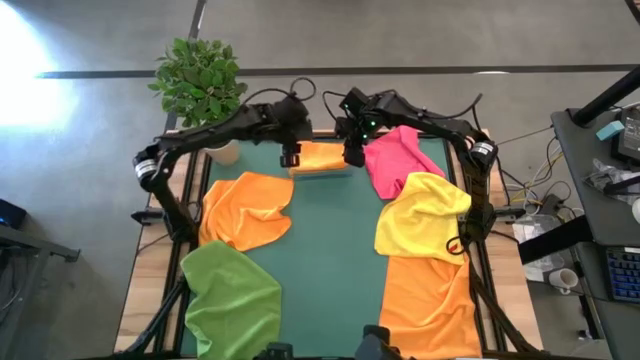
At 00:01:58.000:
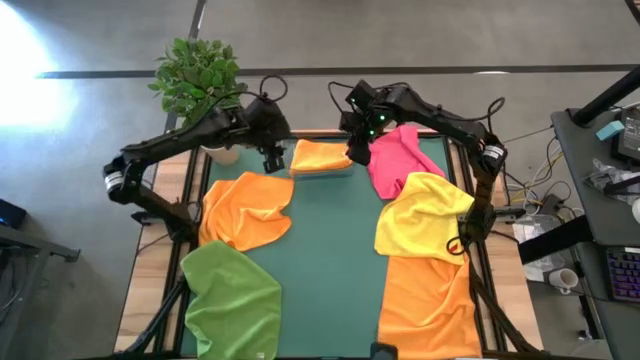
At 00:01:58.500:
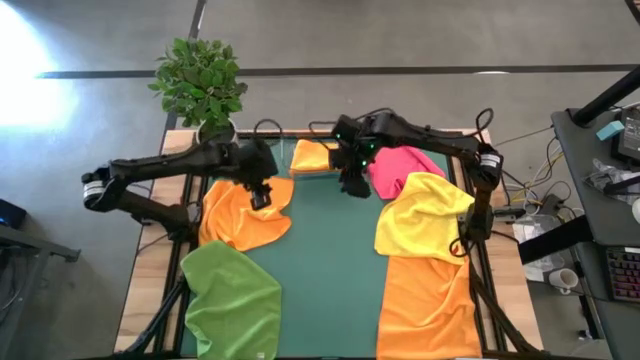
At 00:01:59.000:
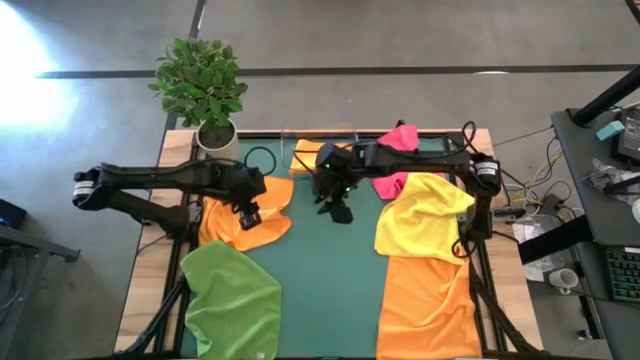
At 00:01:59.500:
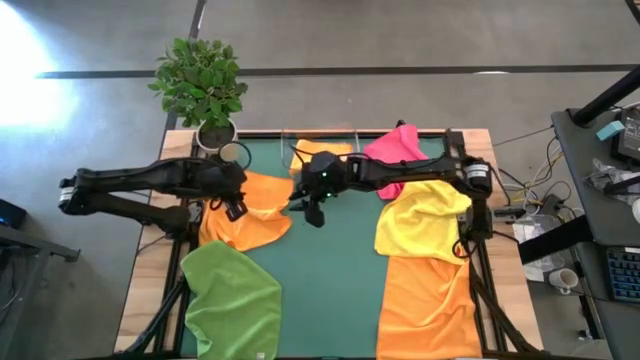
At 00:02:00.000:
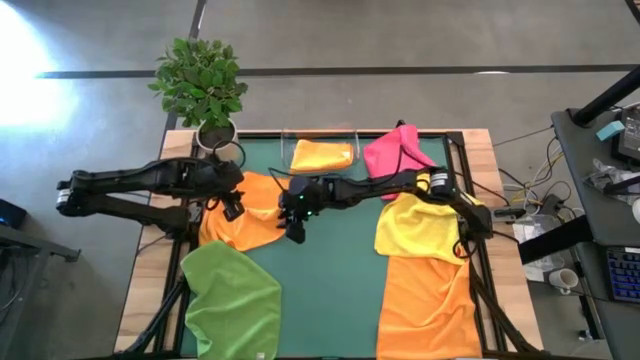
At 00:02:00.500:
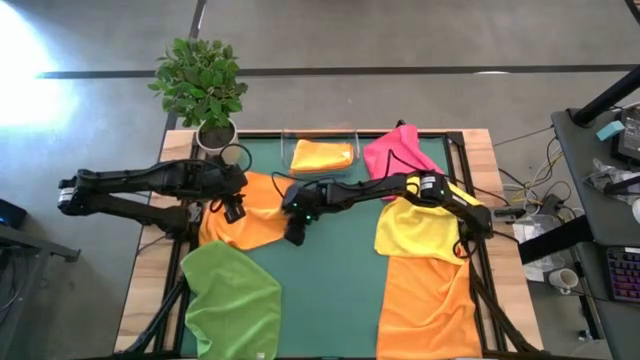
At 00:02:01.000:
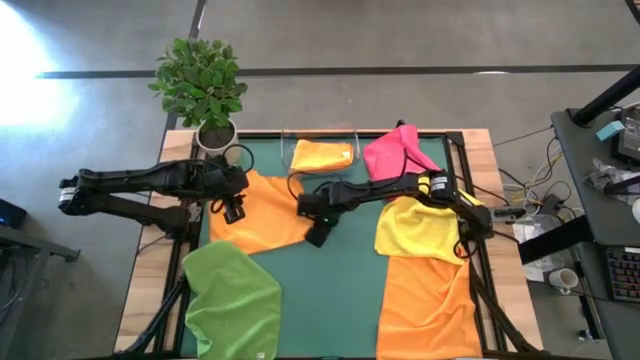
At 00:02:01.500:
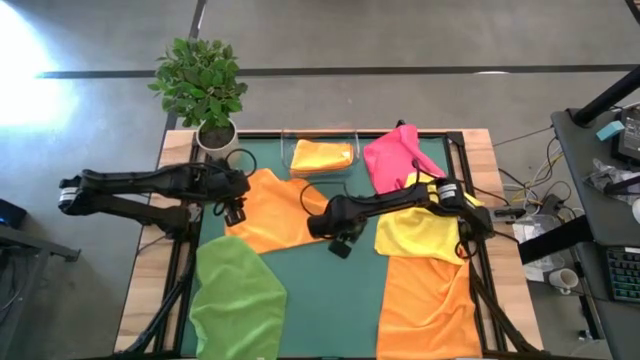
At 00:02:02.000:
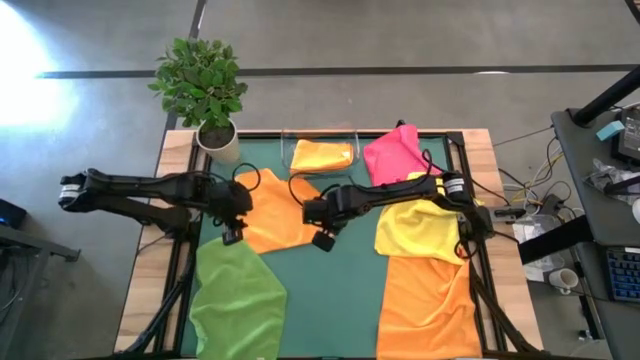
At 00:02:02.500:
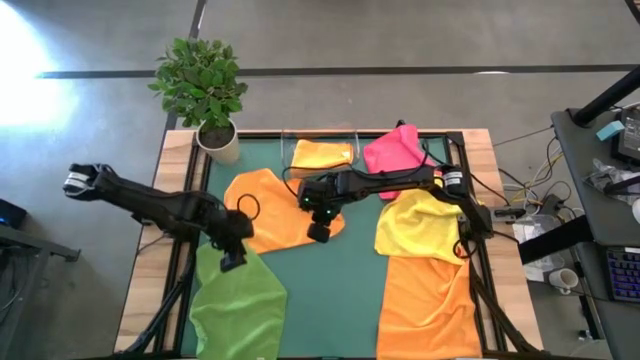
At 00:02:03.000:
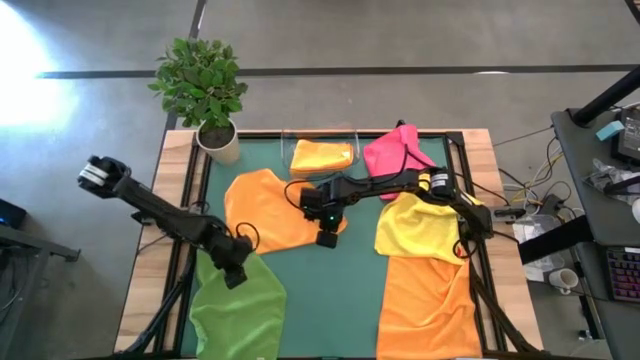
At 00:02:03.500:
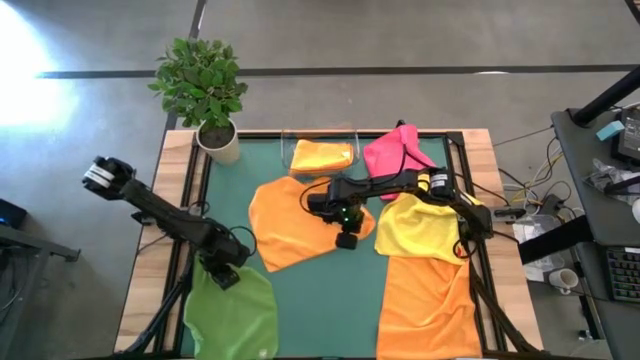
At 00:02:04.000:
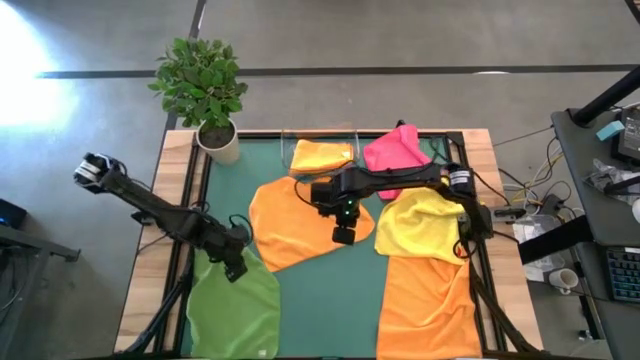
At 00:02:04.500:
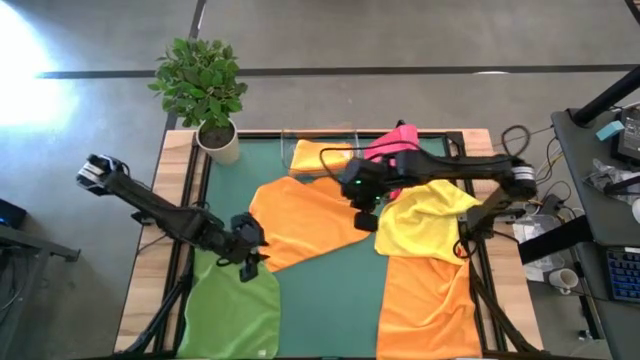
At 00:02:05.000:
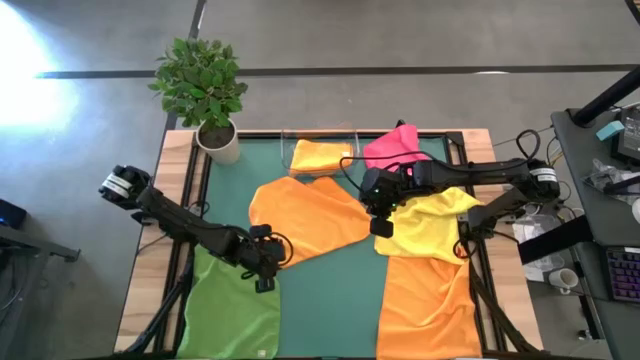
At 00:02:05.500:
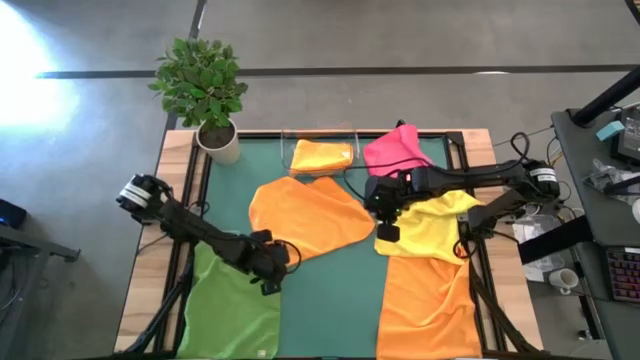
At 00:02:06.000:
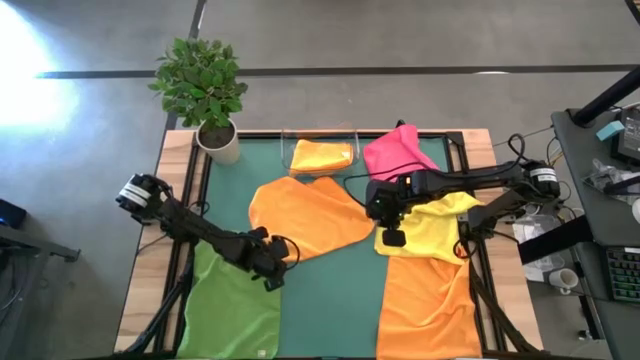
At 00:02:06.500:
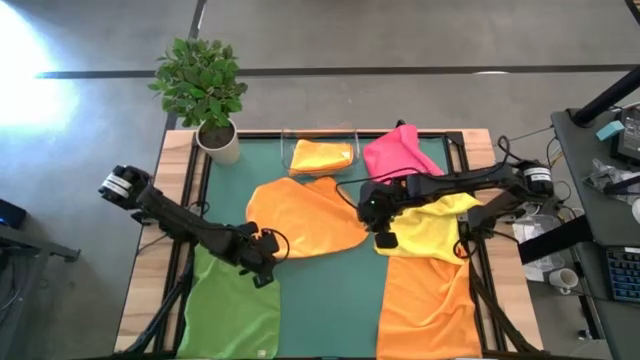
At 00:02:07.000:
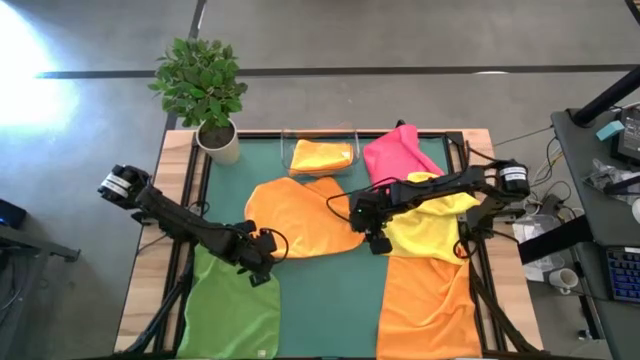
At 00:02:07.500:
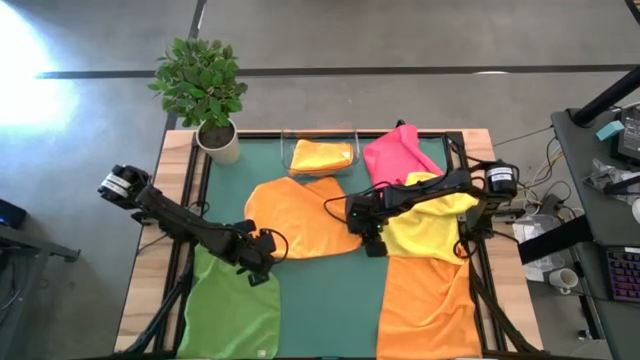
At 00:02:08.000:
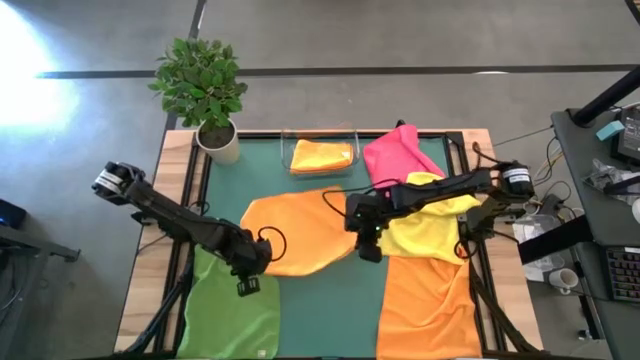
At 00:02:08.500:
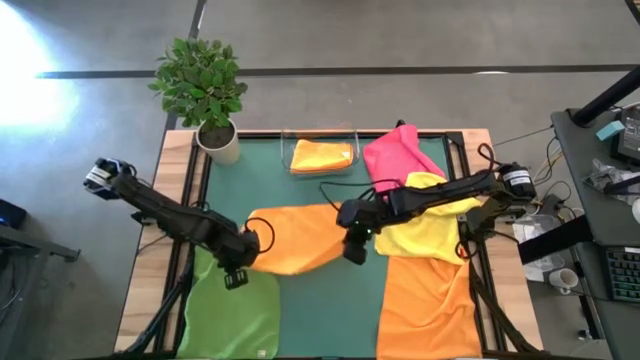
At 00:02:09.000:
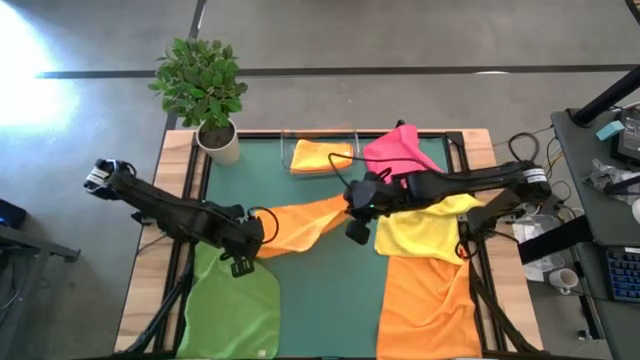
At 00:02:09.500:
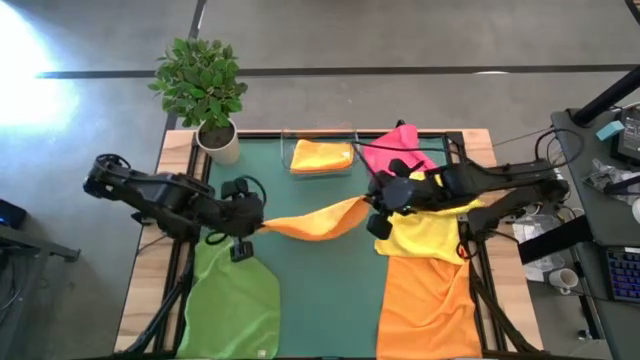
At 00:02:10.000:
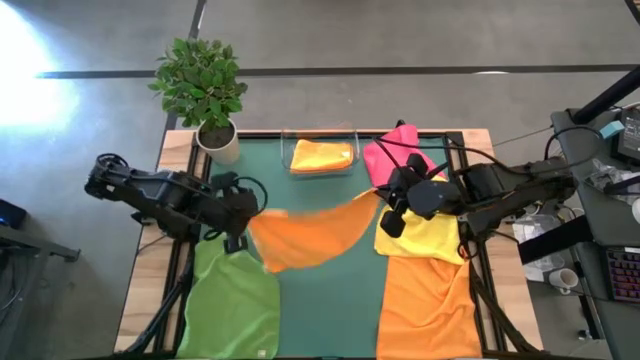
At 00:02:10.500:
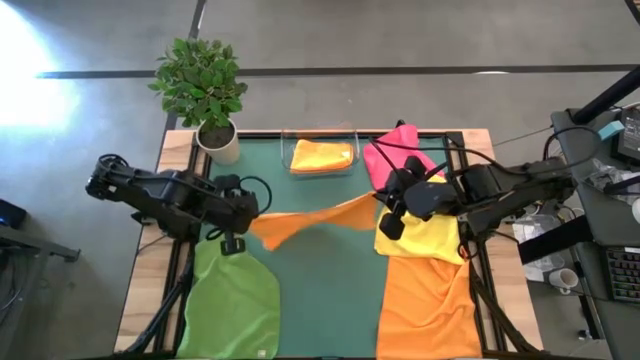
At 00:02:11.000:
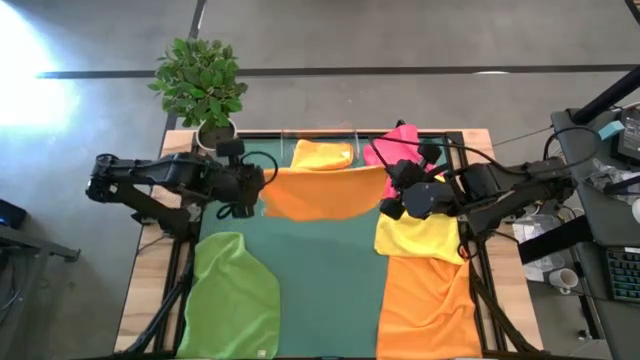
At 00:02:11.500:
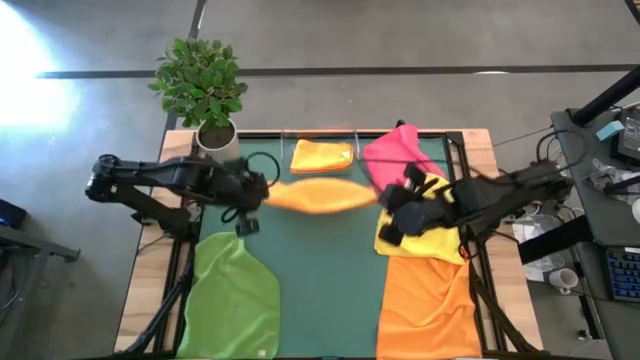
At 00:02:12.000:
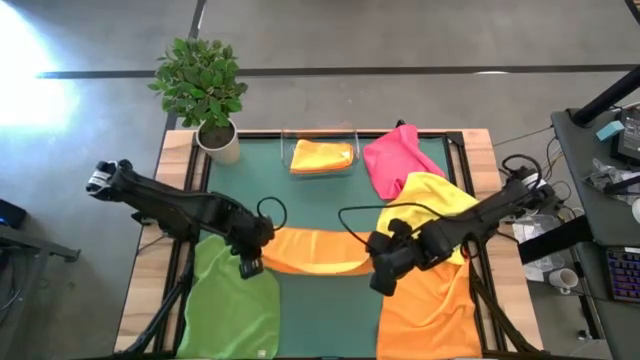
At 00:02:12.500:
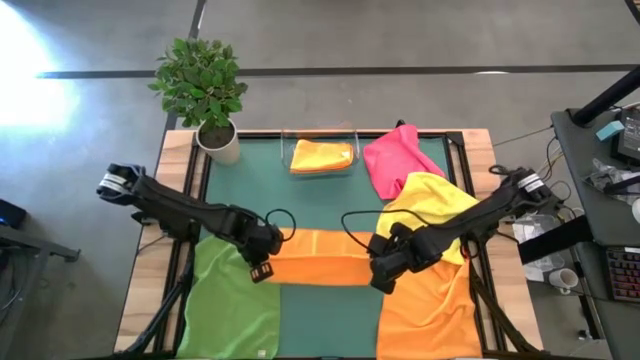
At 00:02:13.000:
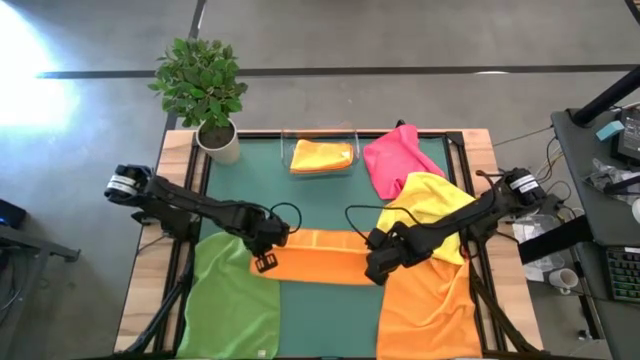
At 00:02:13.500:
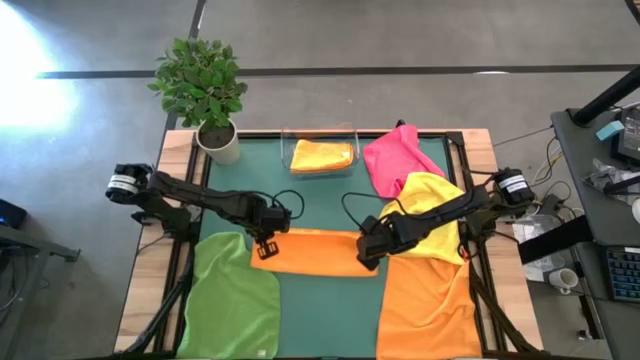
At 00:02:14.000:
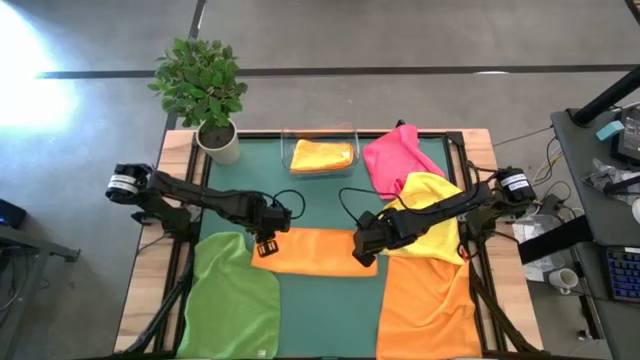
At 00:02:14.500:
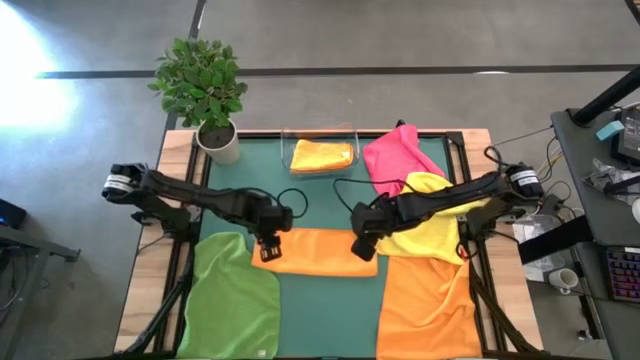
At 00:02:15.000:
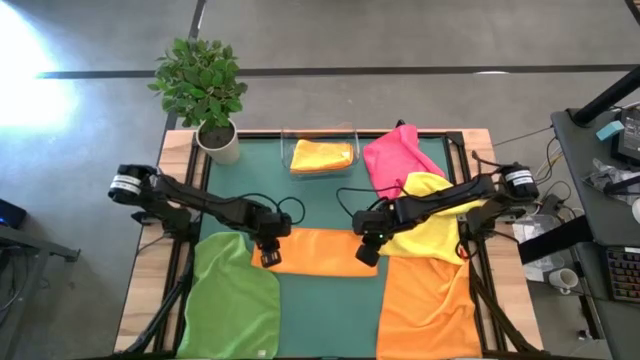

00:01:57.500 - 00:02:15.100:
Task: Fold microfiber towels
Fold the top left orange microfiber towel
